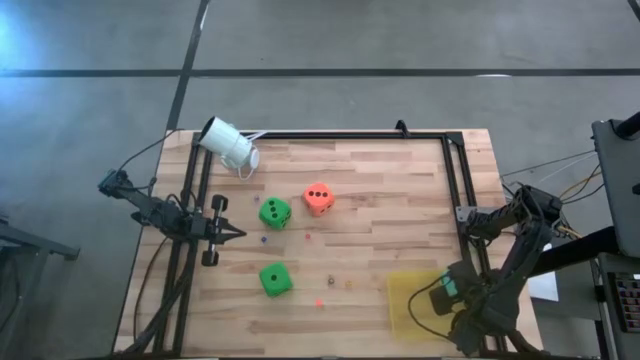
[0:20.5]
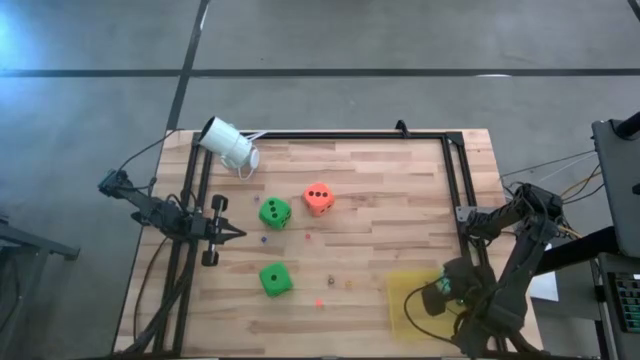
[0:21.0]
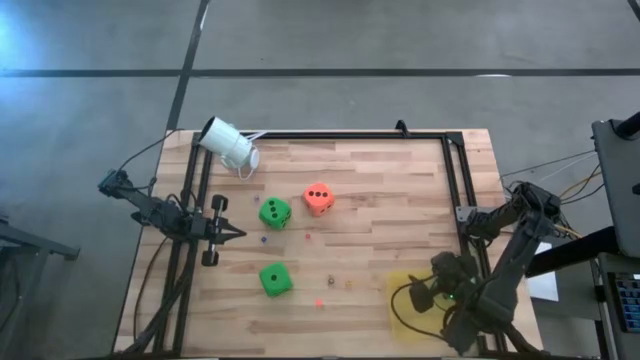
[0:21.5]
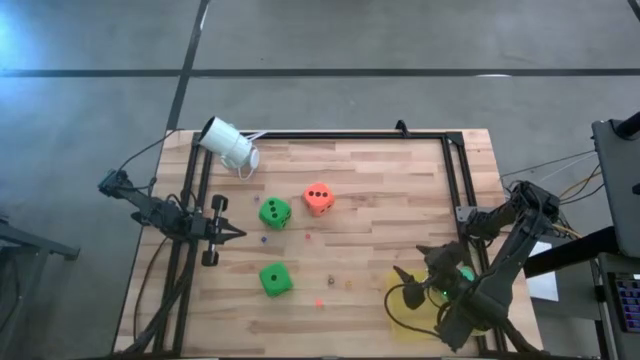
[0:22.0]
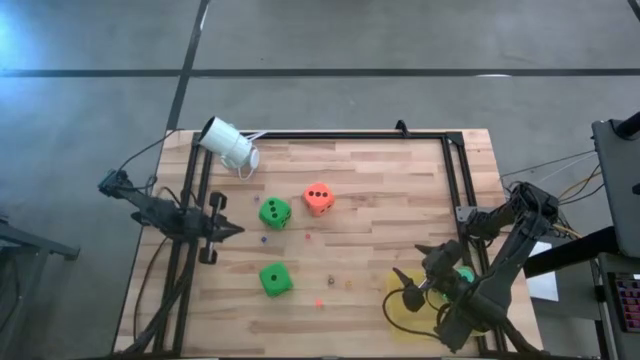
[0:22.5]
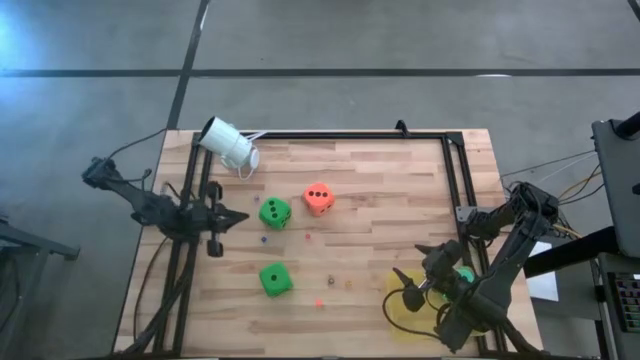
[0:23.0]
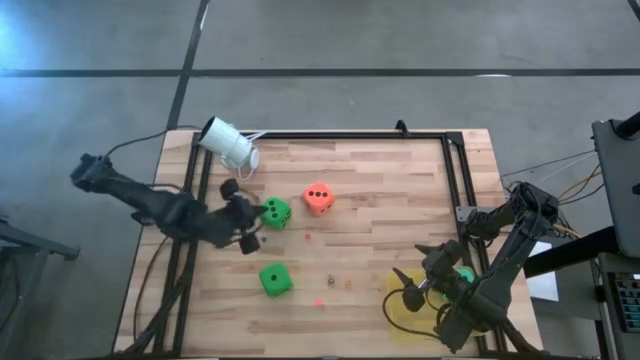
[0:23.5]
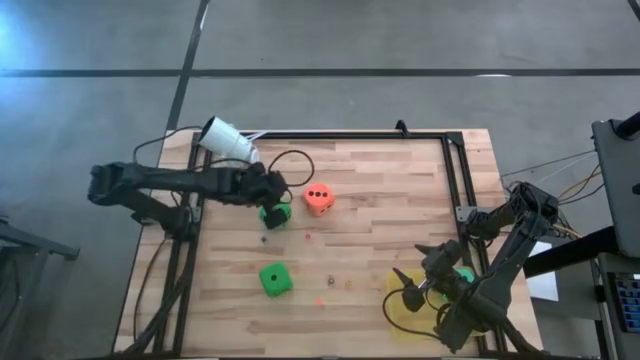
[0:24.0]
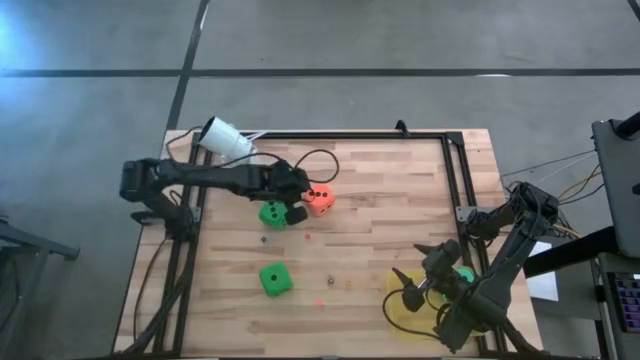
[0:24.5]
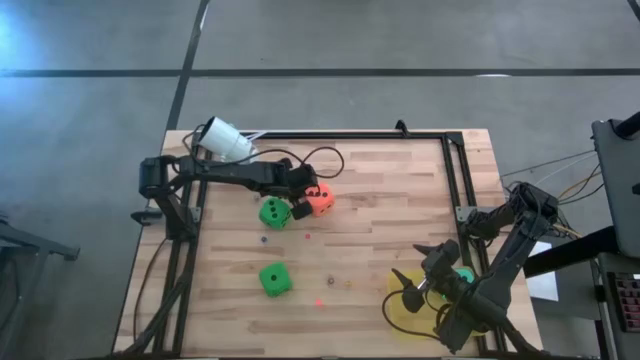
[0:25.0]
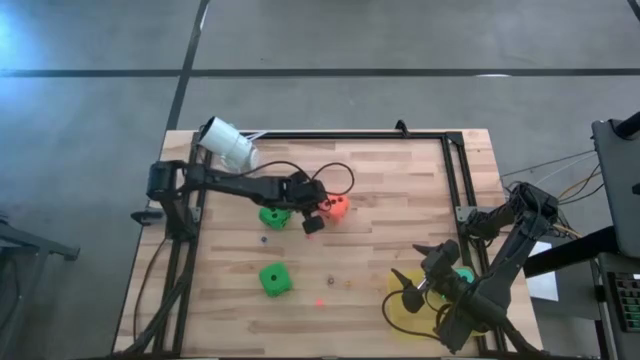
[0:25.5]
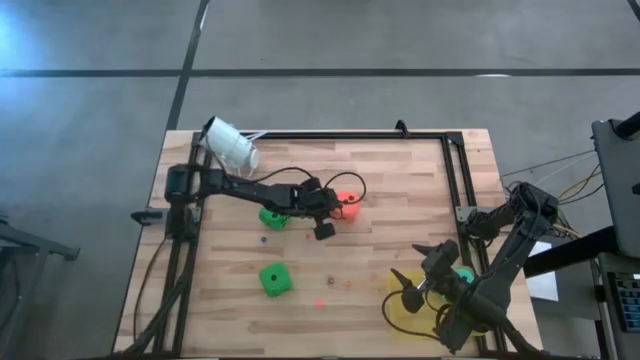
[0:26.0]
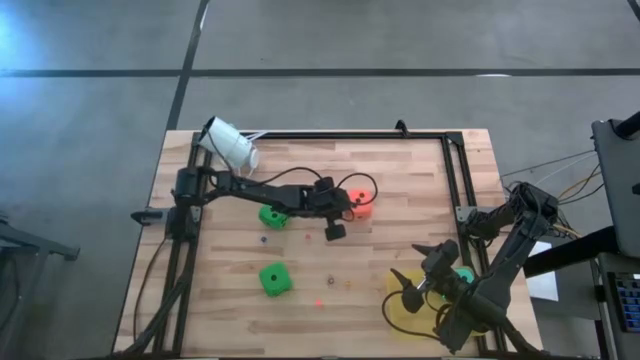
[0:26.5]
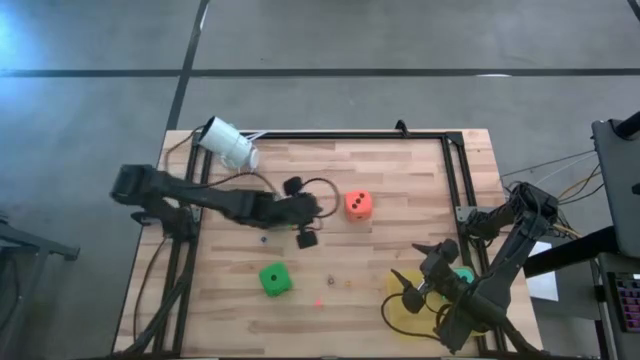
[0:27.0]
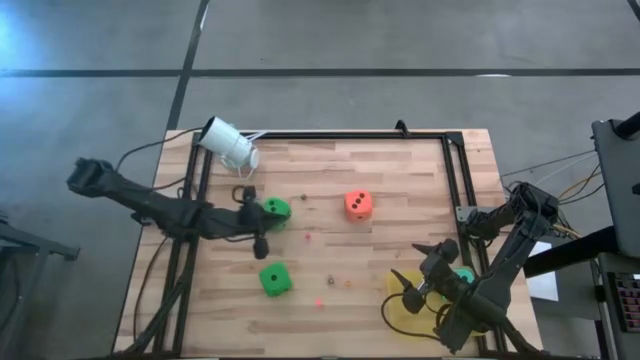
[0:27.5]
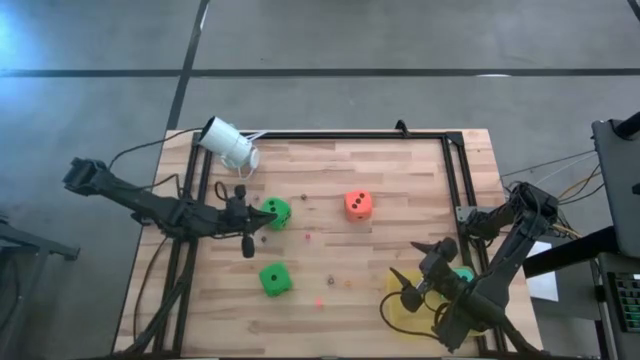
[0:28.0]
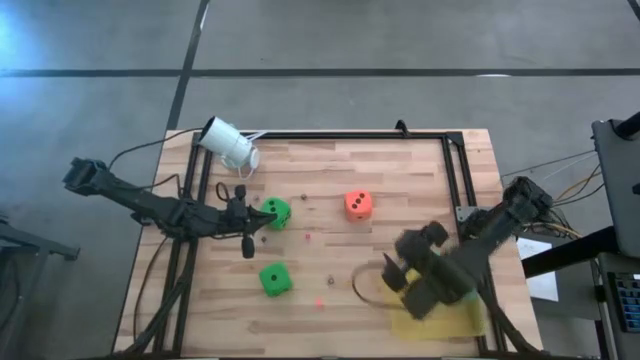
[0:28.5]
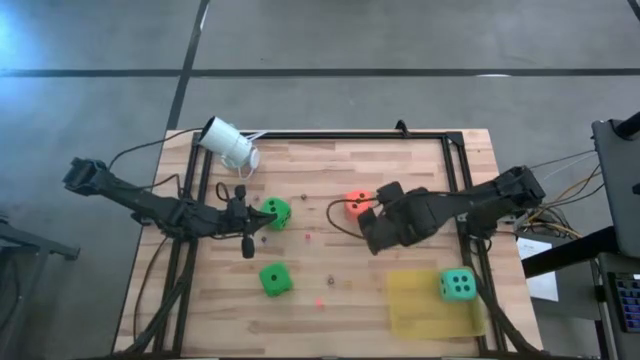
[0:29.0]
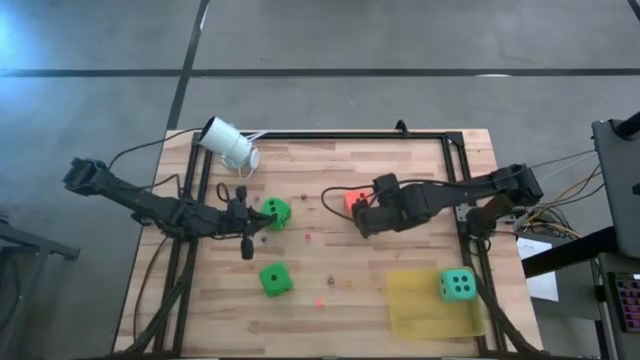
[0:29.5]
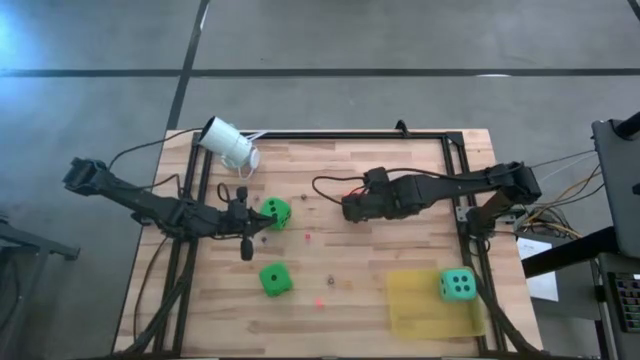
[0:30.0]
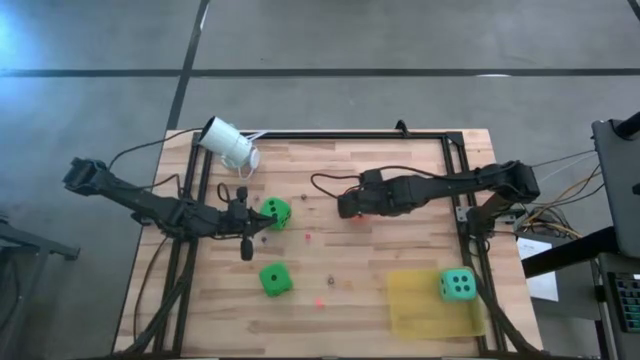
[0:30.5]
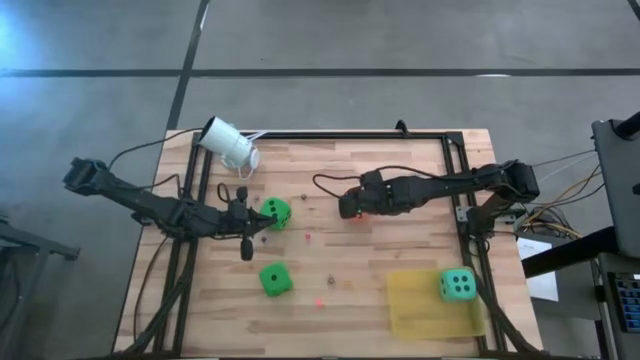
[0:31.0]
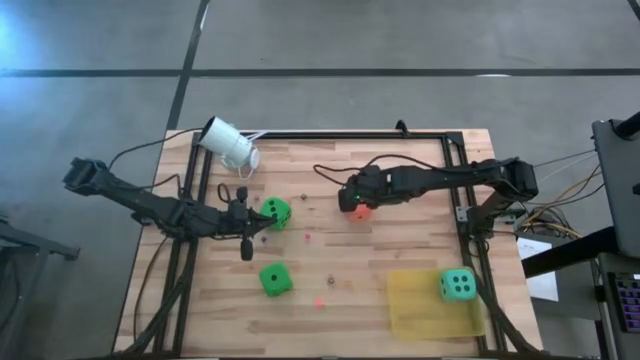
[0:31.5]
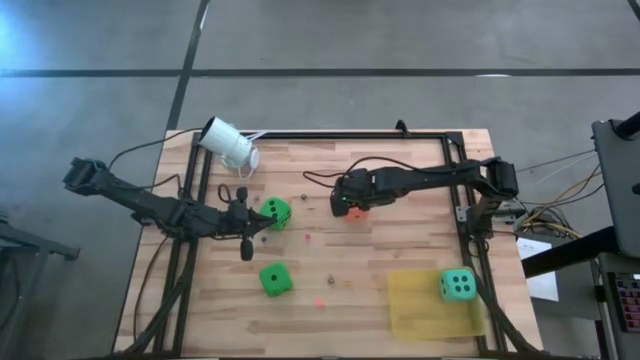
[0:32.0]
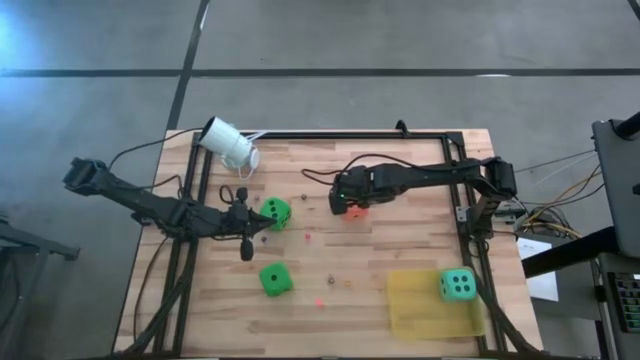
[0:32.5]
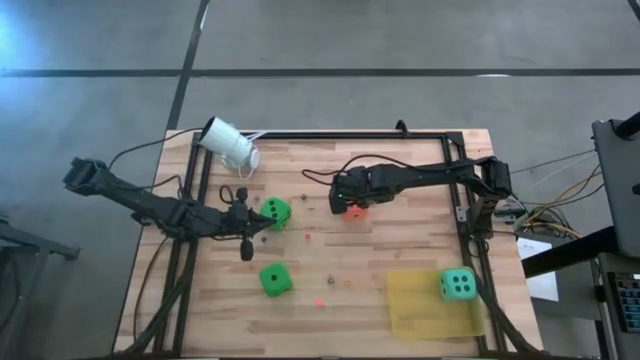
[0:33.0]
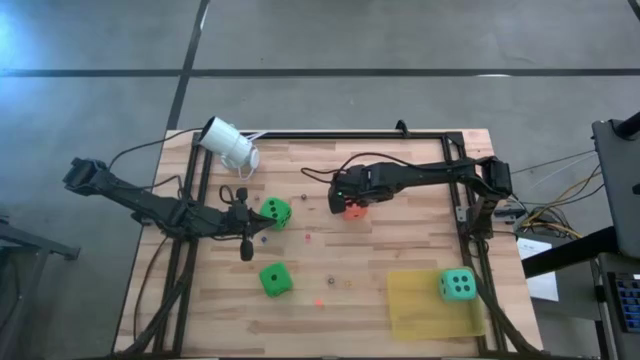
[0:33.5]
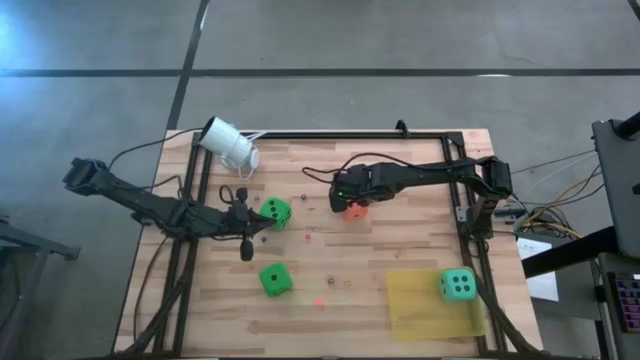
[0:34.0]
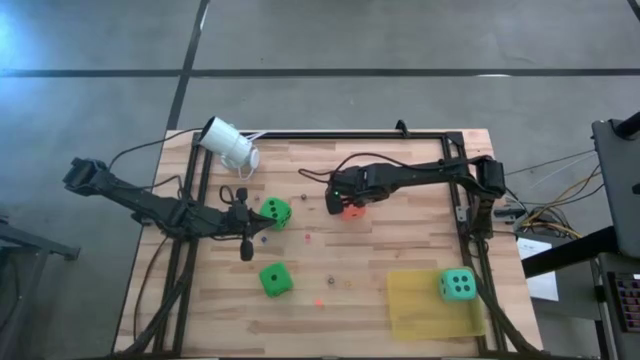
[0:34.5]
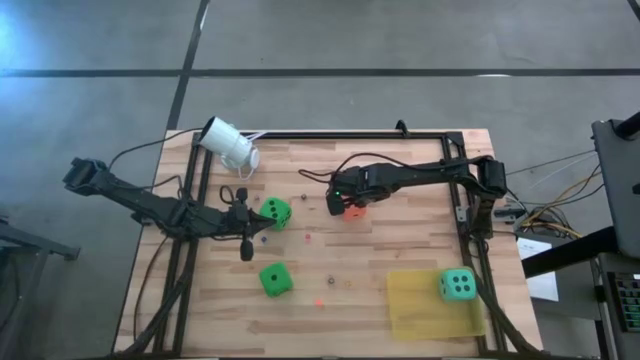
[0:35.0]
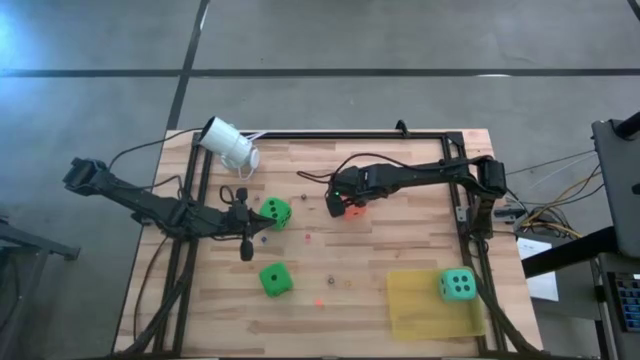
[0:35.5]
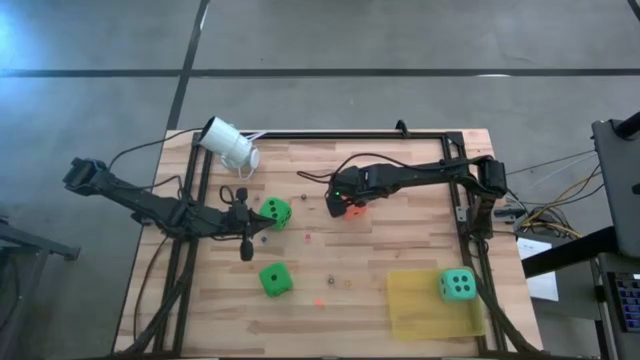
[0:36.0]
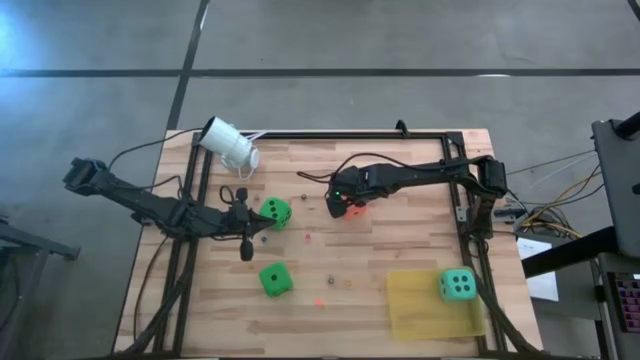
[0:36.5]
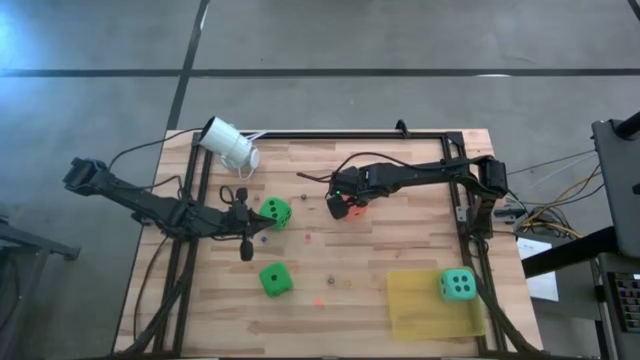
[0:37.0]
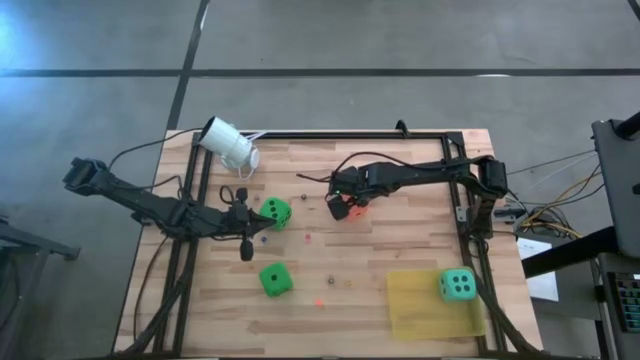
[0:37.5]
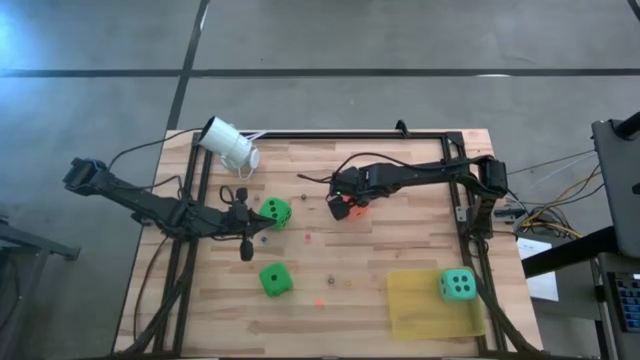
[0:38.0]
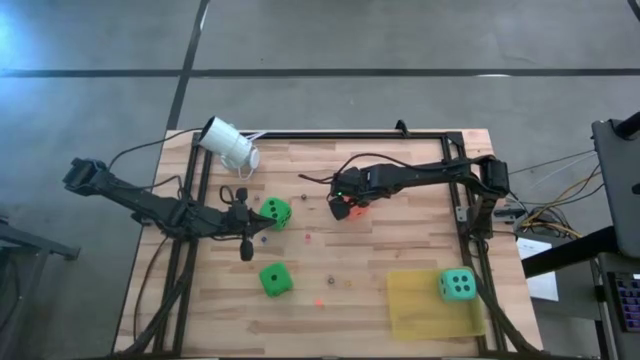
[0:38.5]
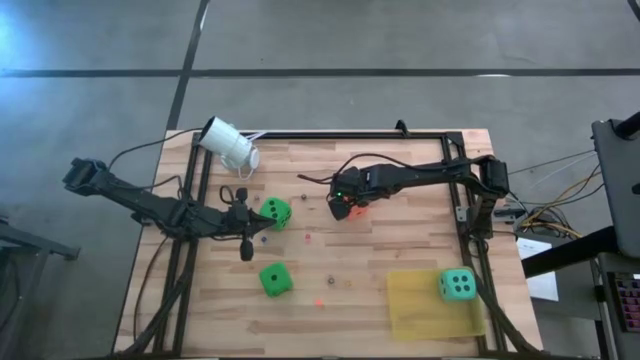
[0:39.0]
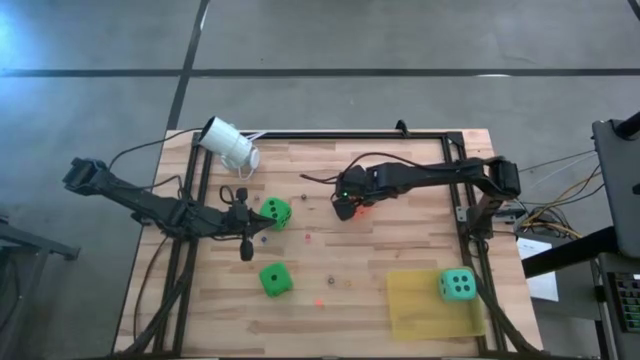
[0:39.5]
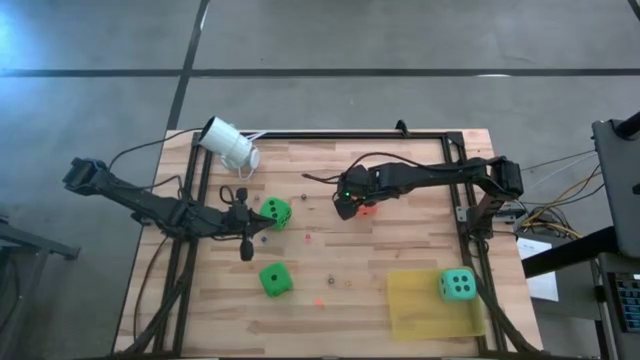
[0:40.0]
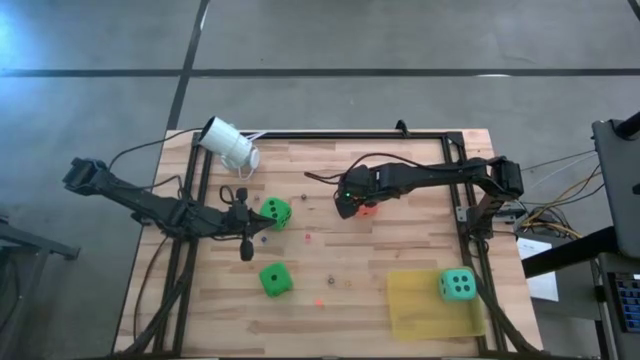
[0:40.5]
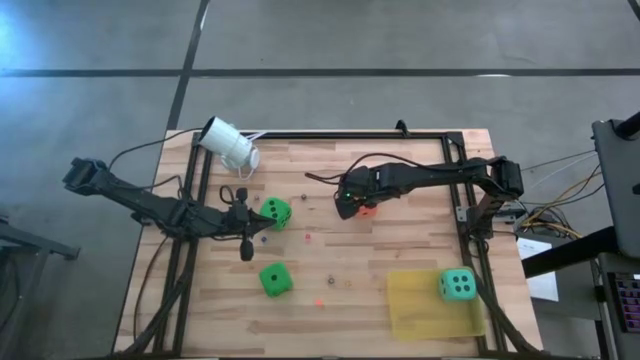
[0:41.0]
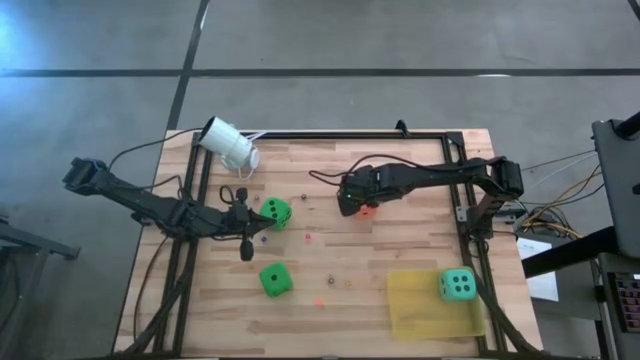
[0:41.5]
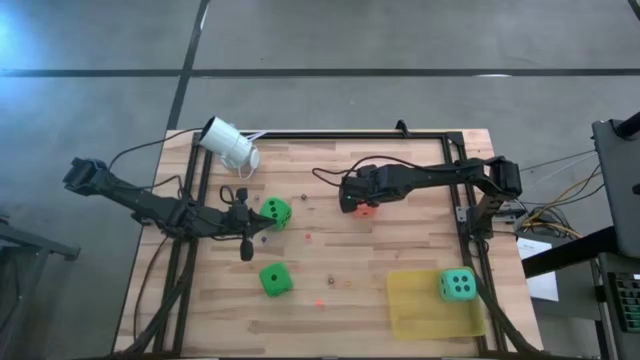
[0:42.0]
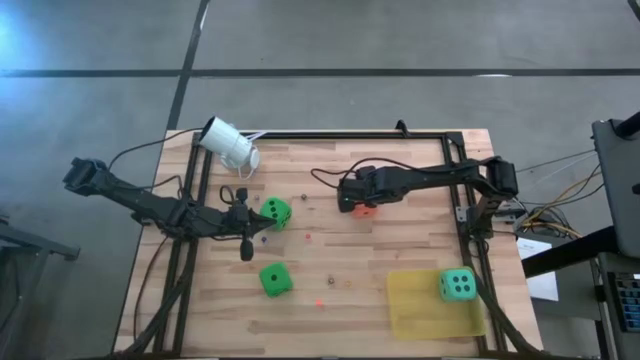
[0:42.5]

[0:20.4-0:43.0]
Task: Pick & Place Dice
Put the large orange die into the yellow bin
